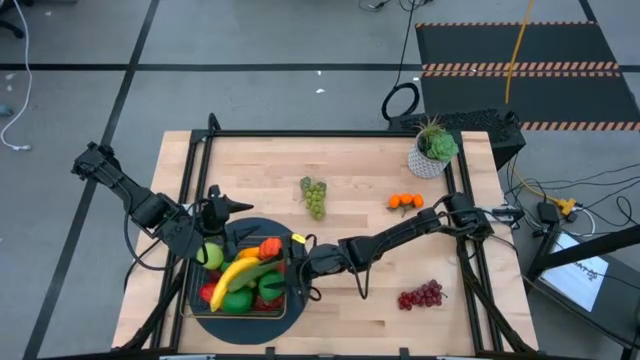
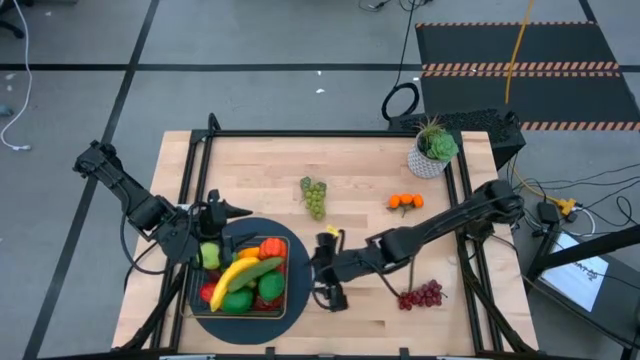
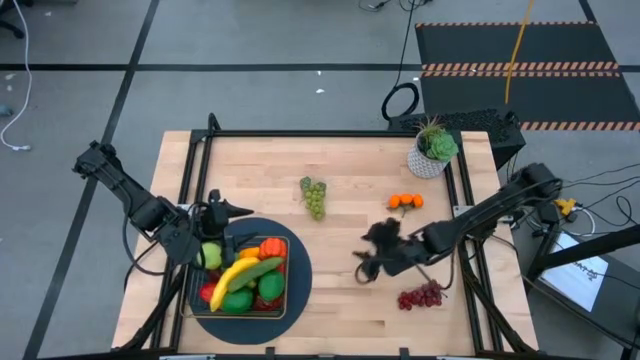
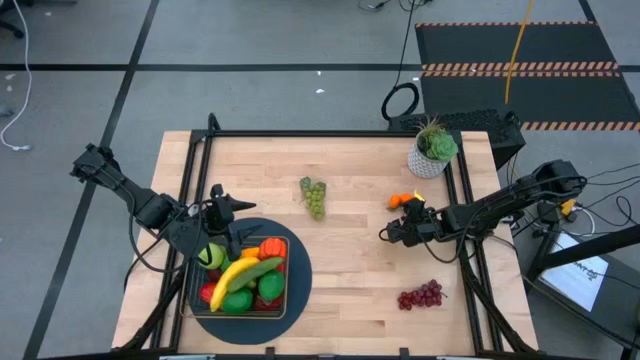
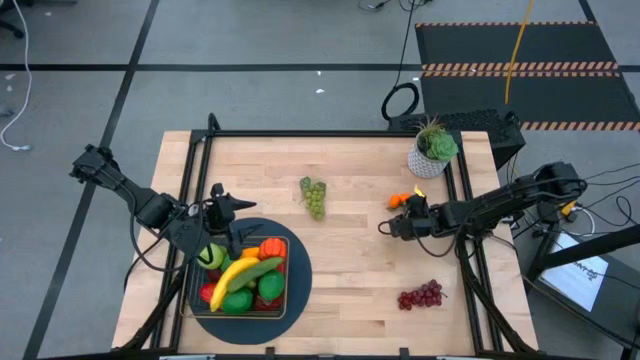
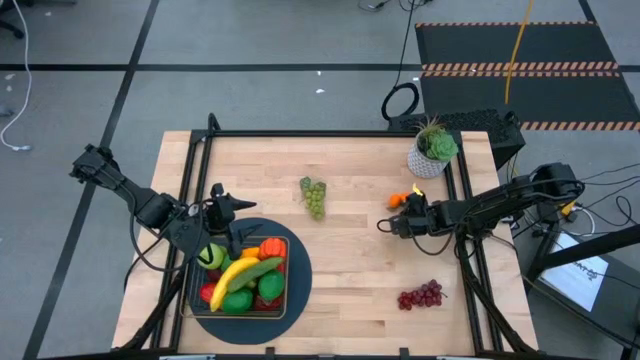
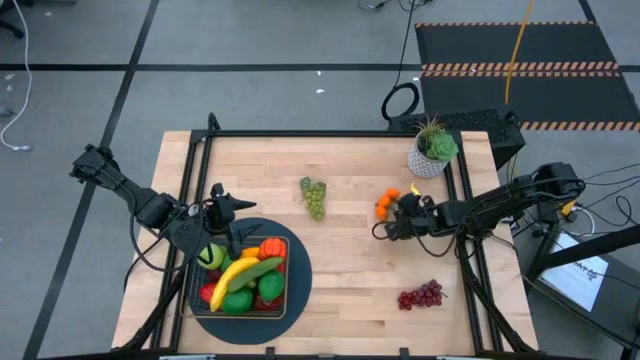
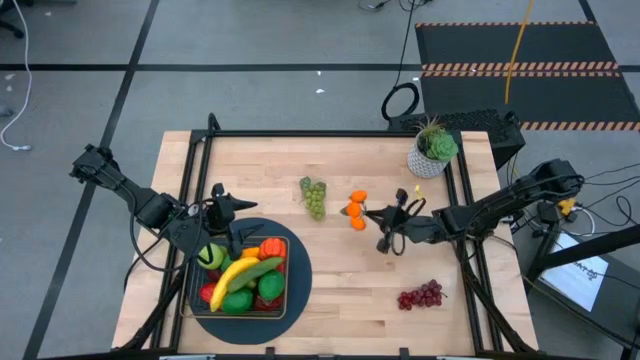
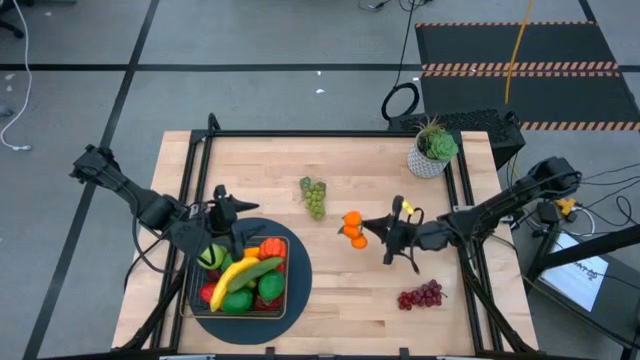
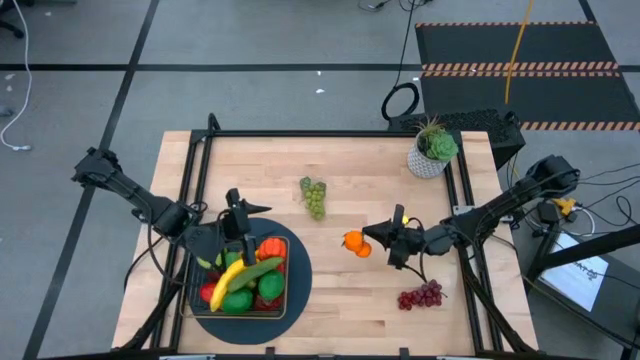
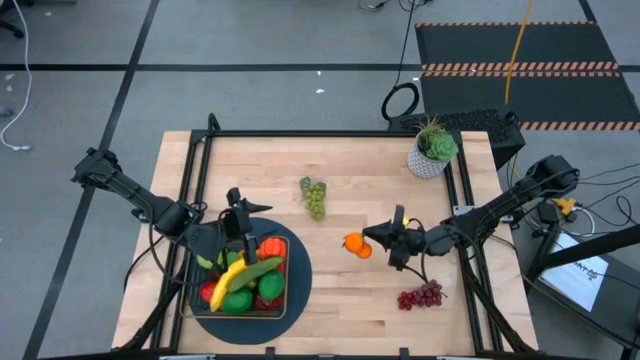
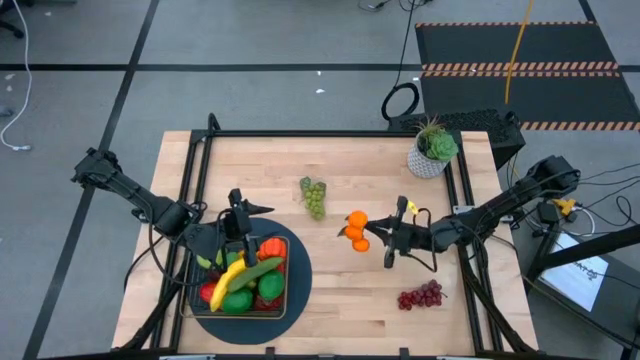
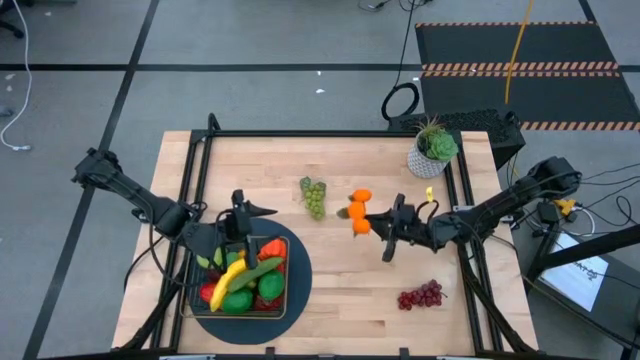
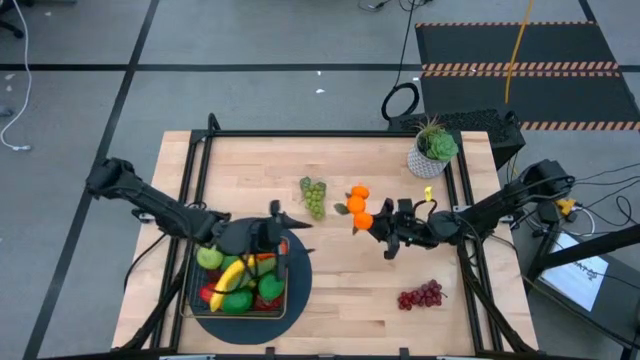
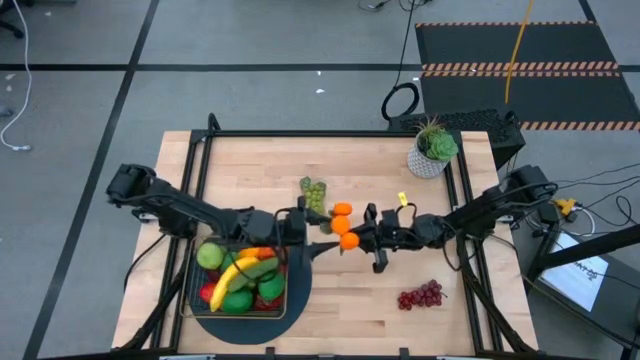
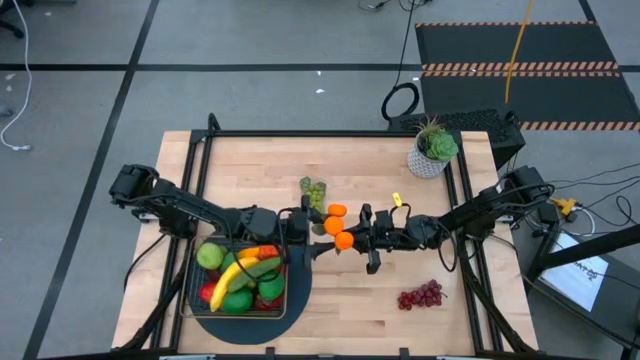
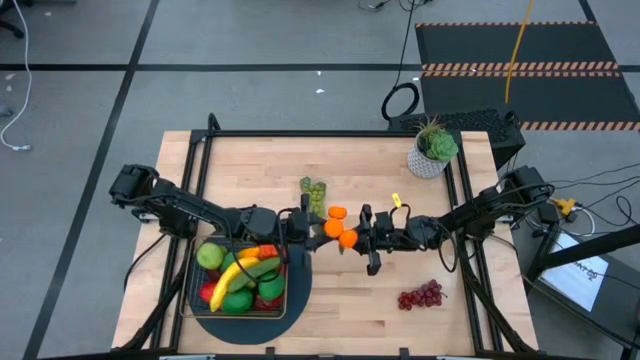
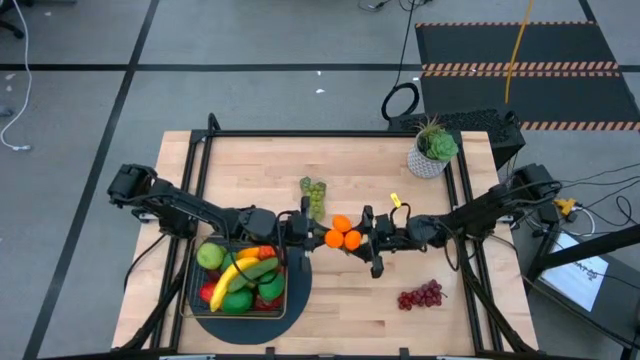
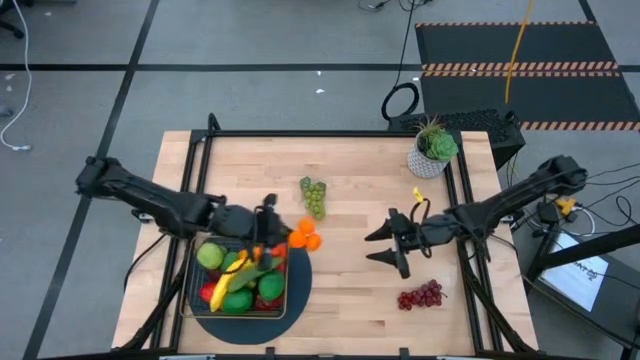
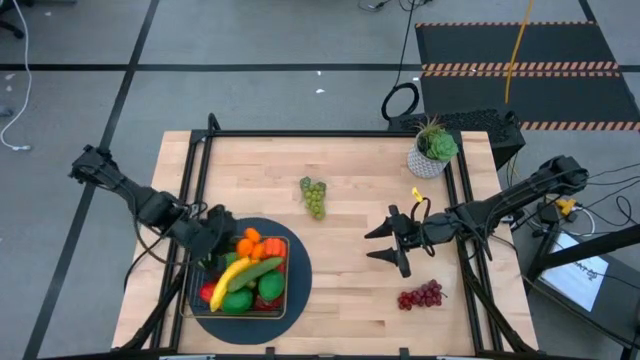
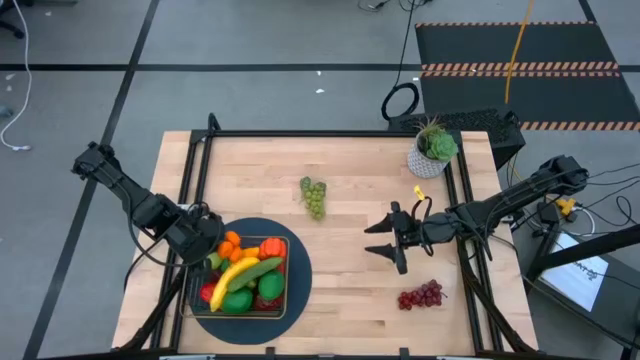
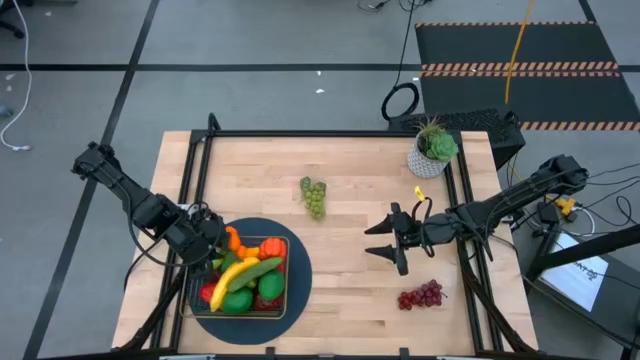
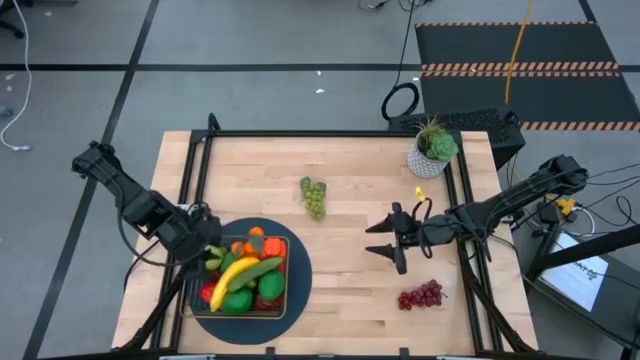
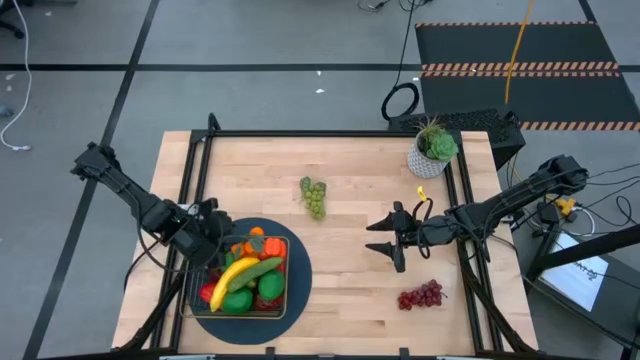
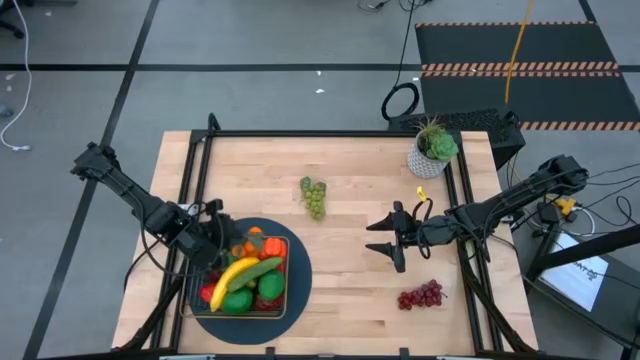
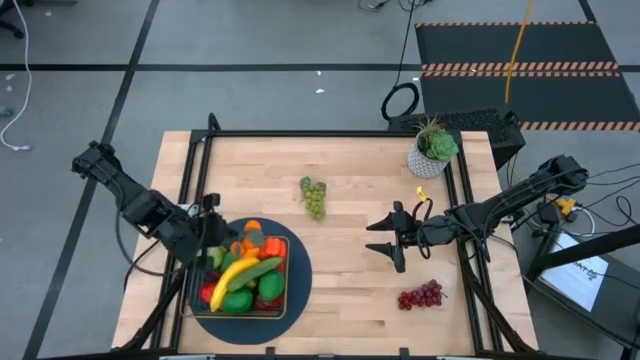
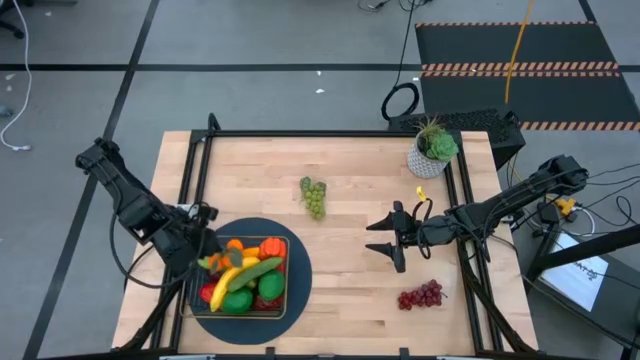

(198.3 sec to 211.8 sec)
Task: Build produce basket
Put the tangerines into the gold wire basket

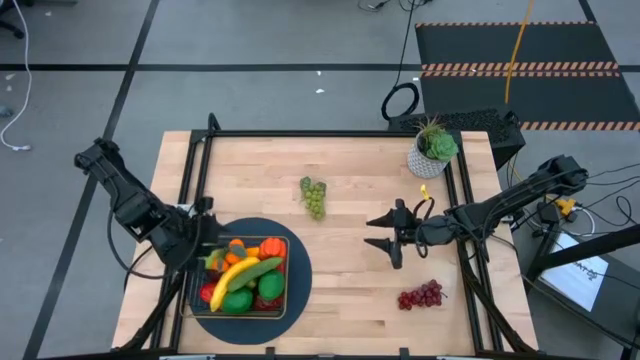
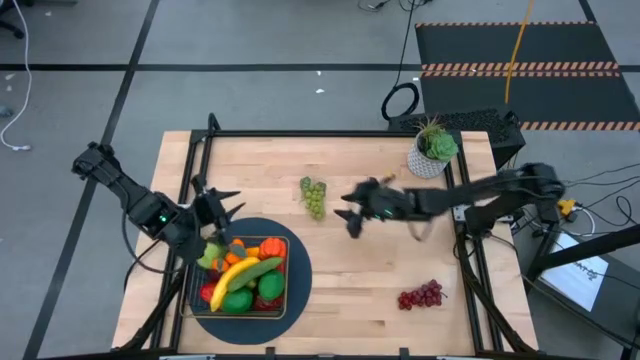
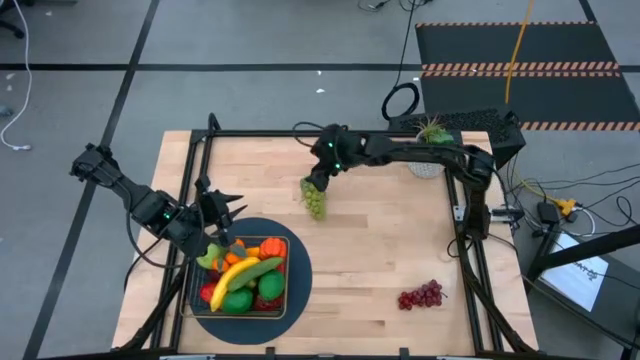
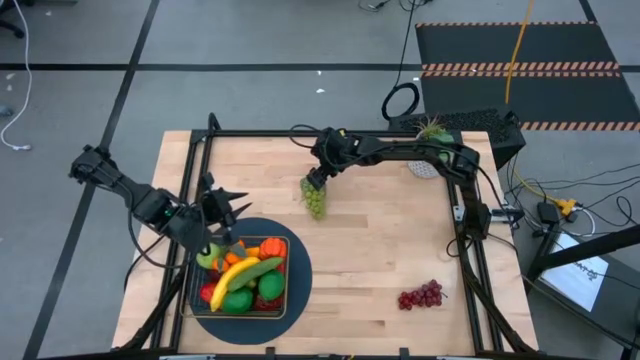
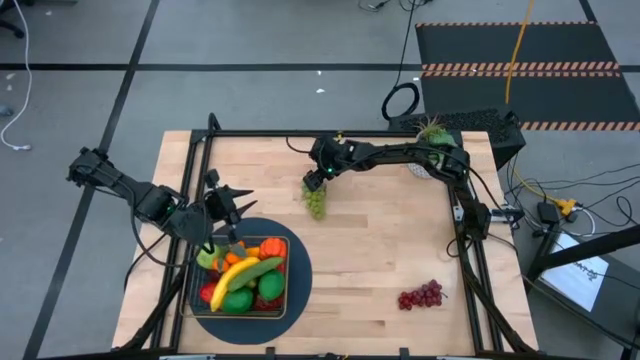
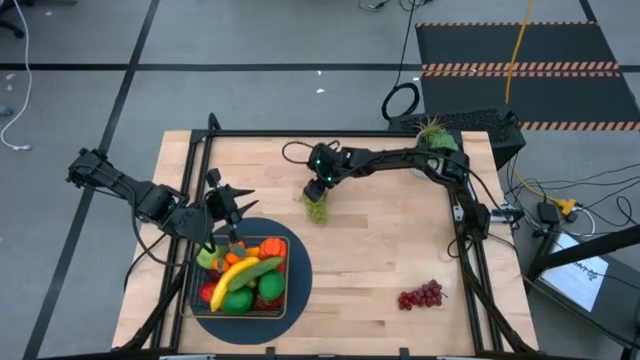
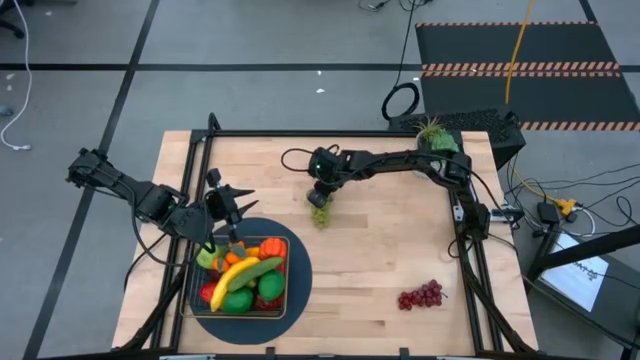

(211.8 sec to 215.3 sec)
Put the green grapes into the gold wire basket

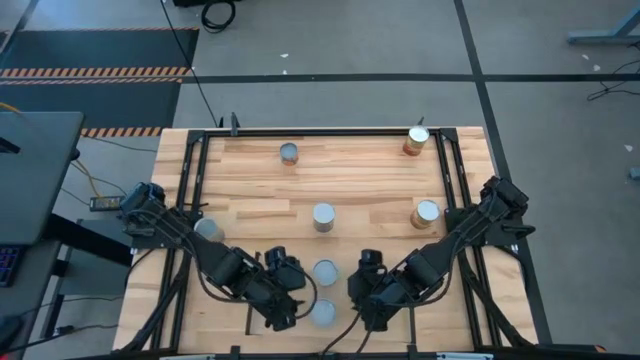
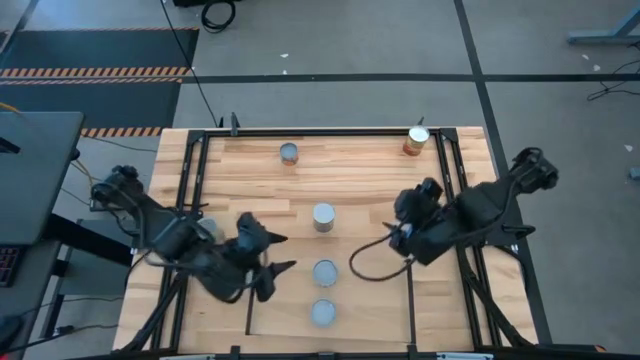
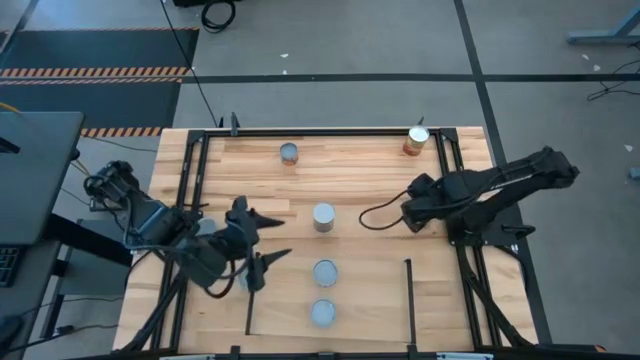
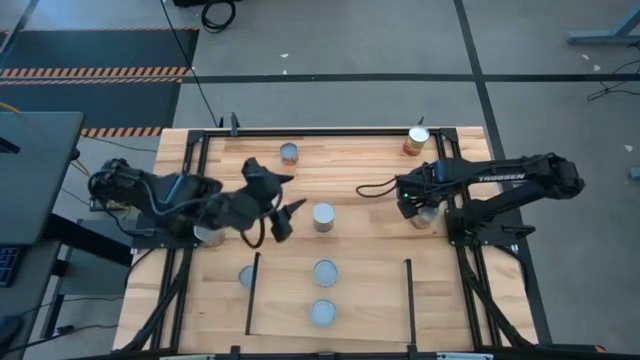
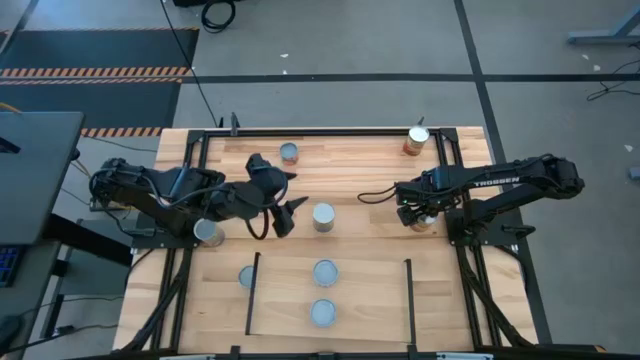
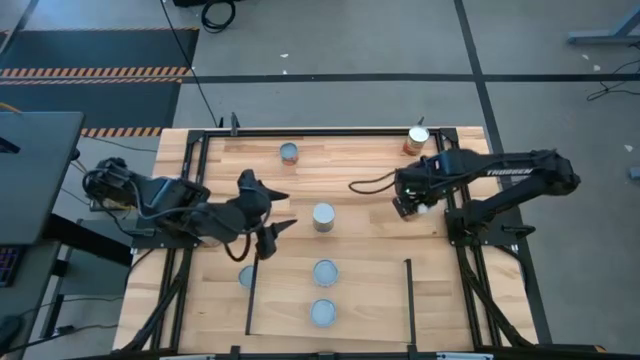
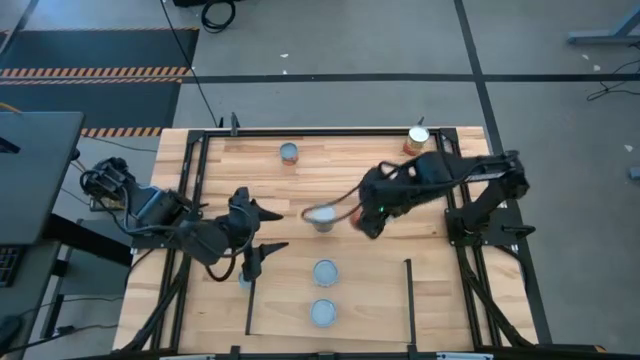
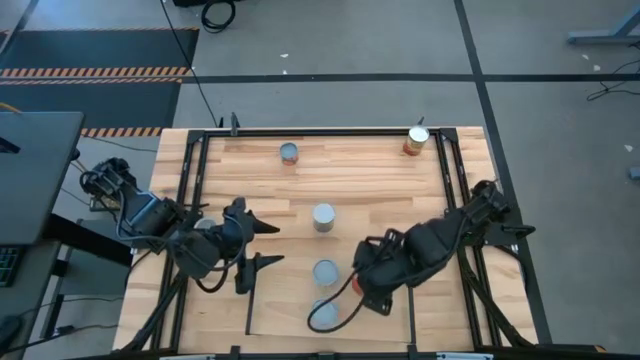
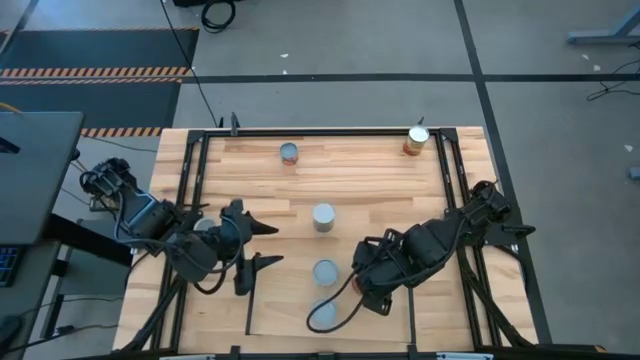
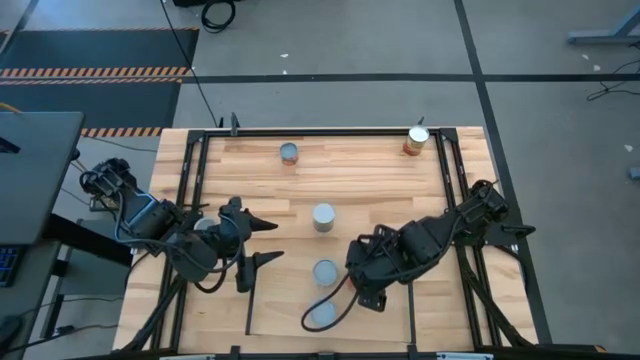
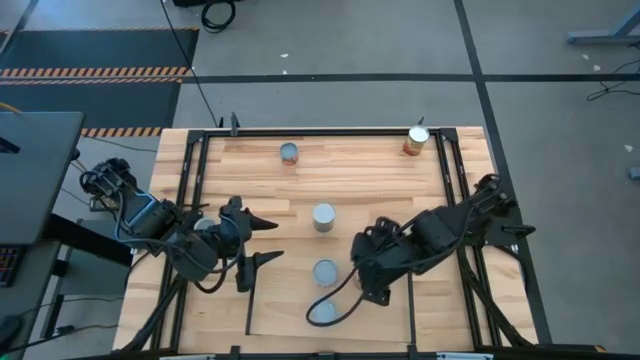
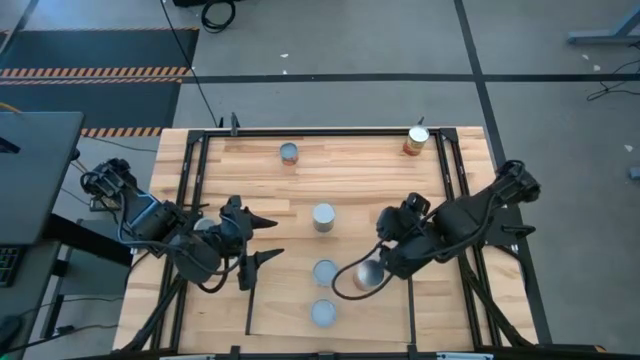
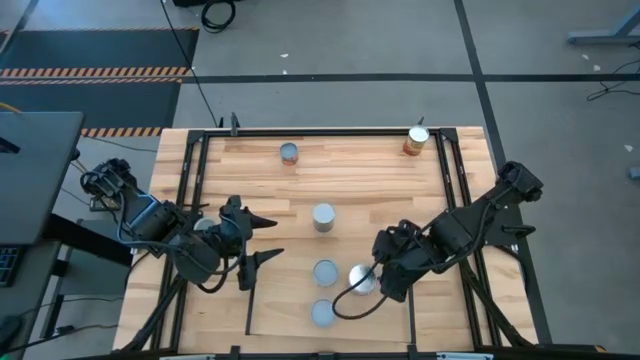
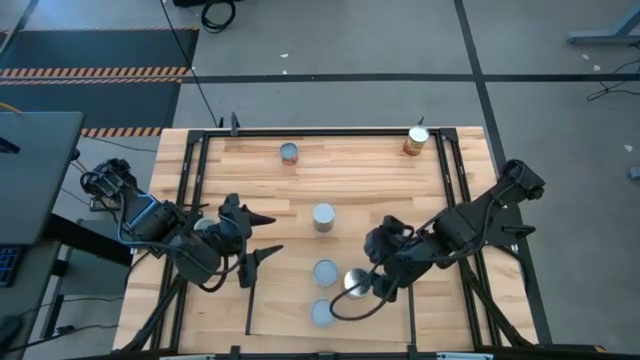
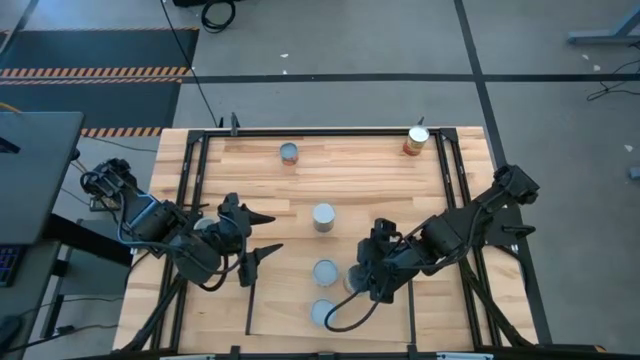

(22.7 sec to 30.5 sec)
Task: Pick and place cans onto a shelf
Put the bottom canned corn on the shelf
